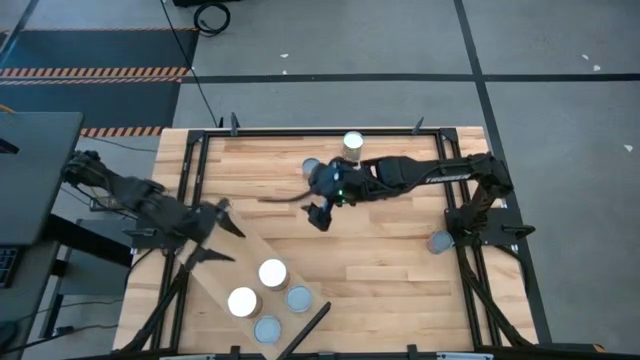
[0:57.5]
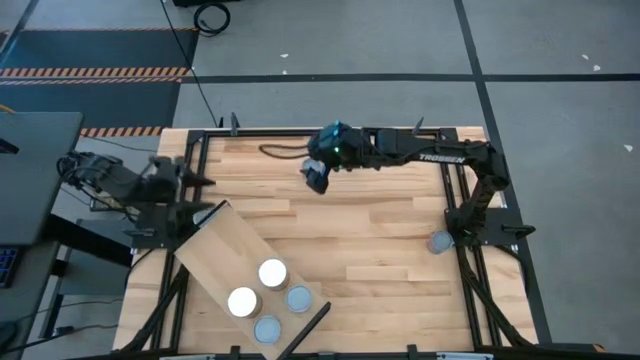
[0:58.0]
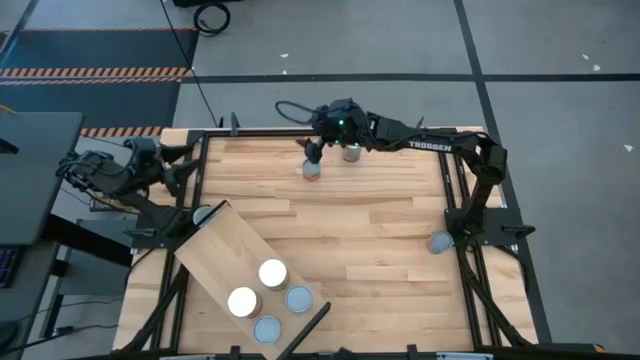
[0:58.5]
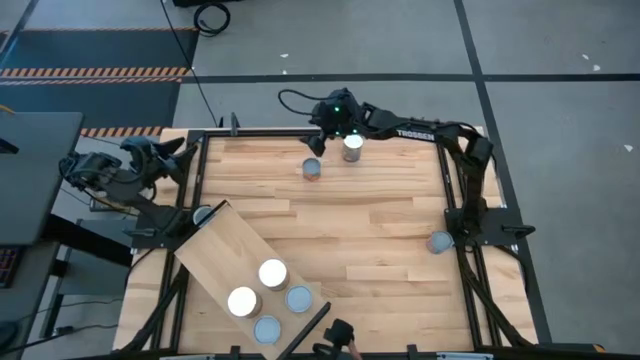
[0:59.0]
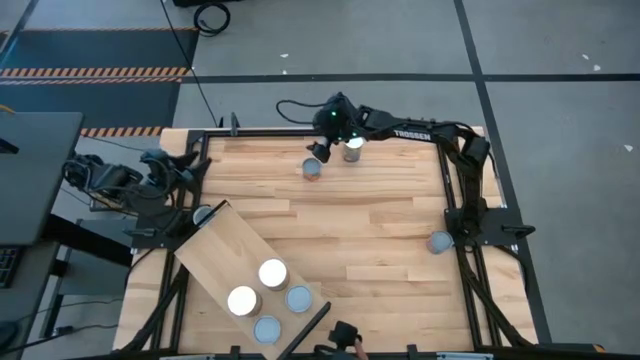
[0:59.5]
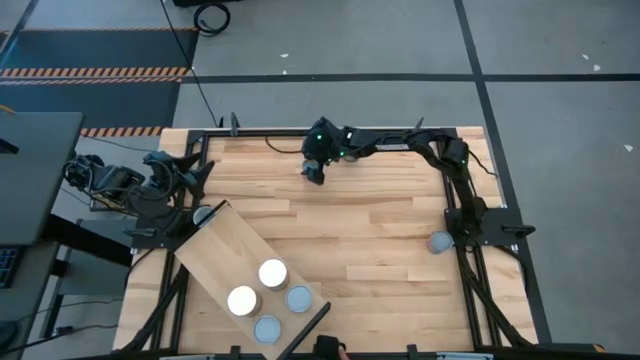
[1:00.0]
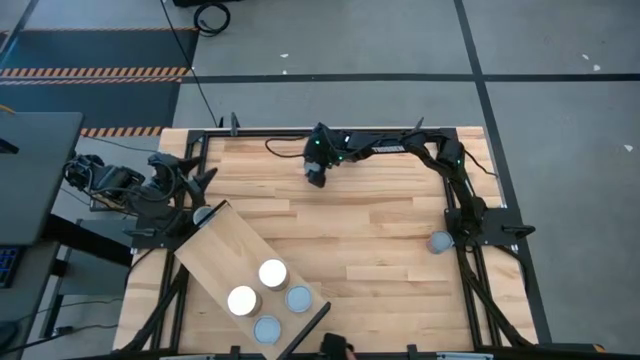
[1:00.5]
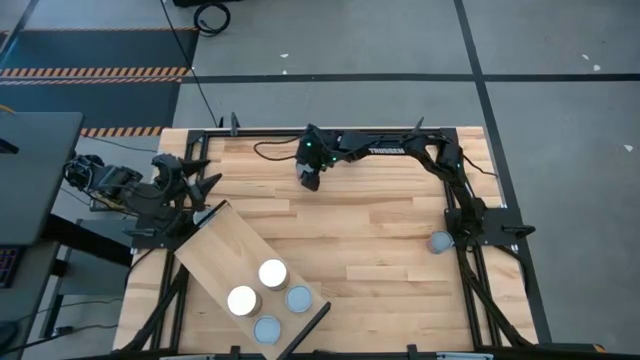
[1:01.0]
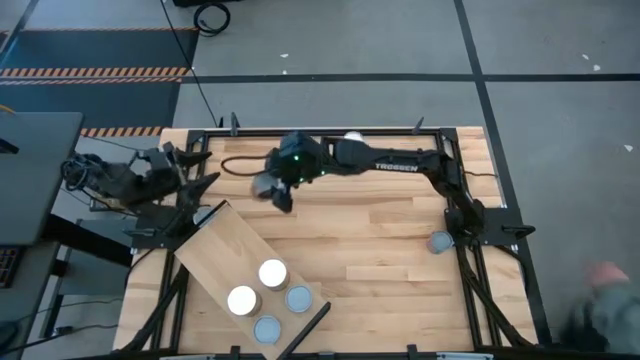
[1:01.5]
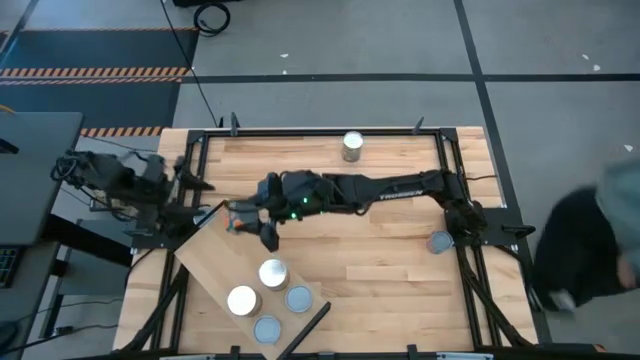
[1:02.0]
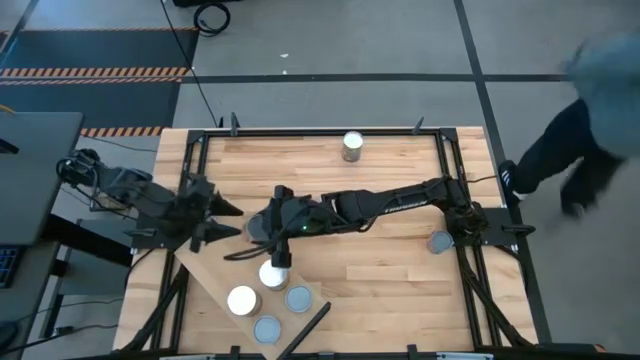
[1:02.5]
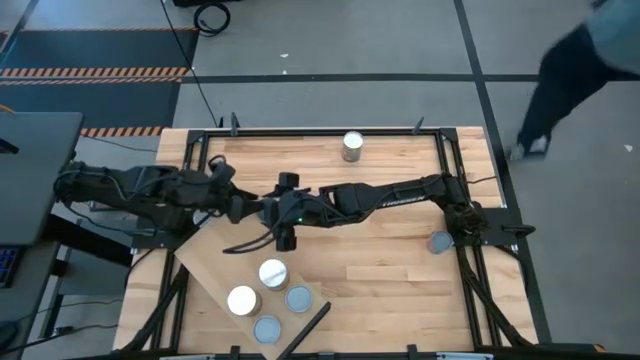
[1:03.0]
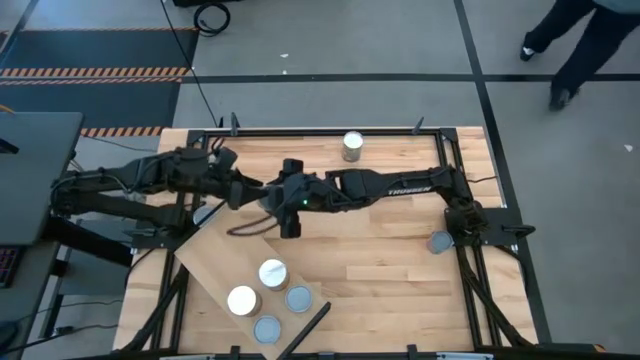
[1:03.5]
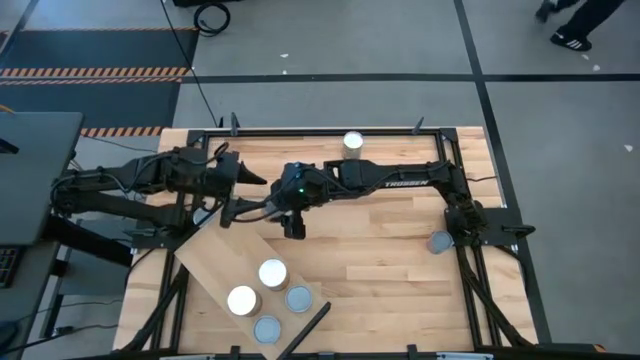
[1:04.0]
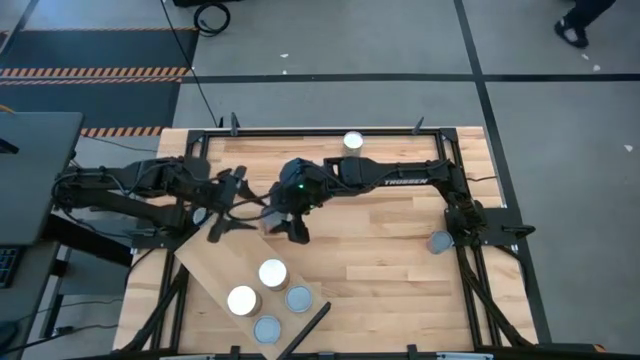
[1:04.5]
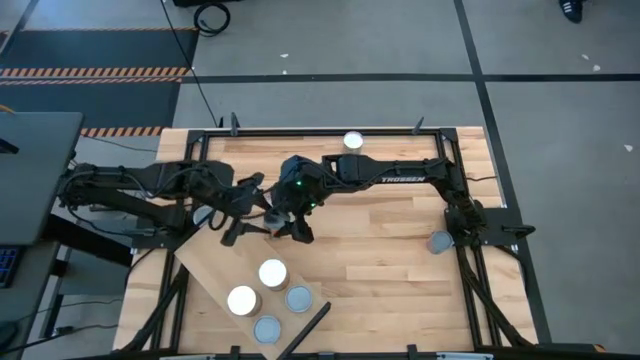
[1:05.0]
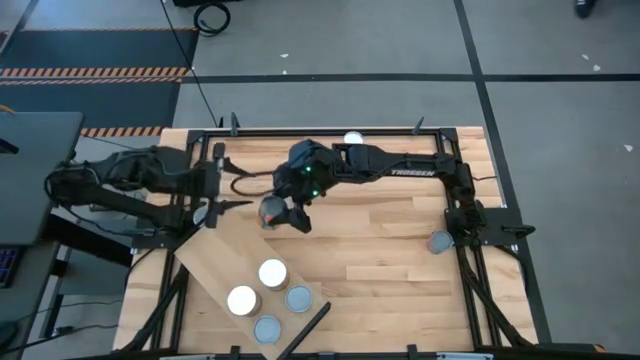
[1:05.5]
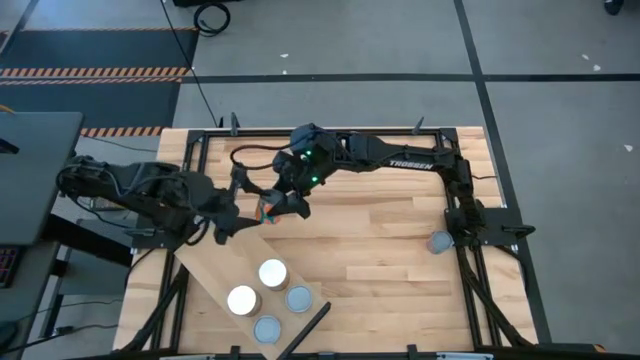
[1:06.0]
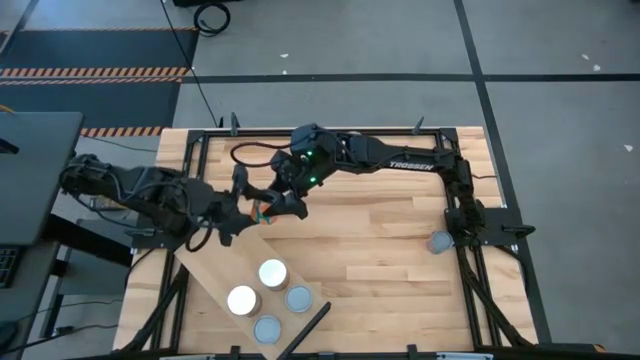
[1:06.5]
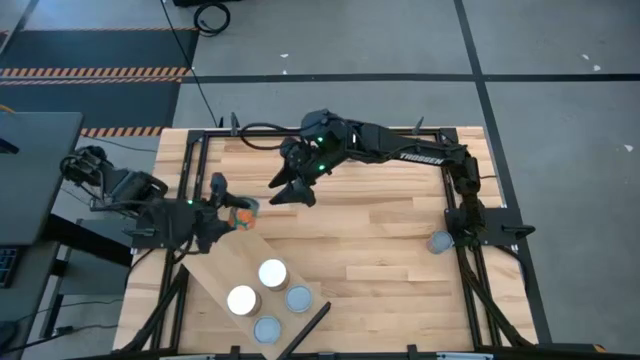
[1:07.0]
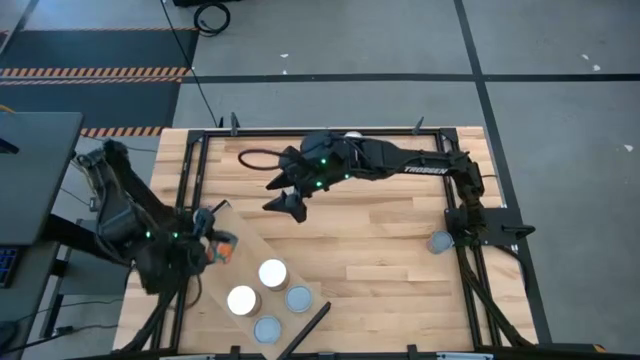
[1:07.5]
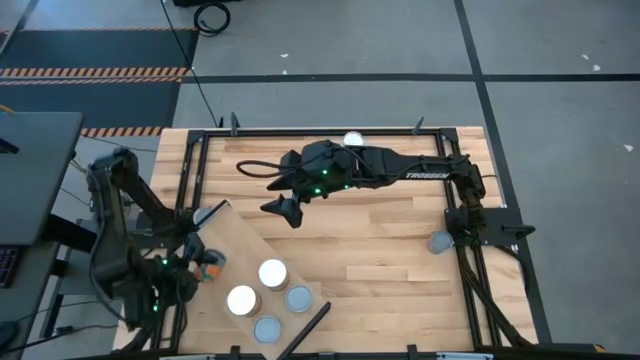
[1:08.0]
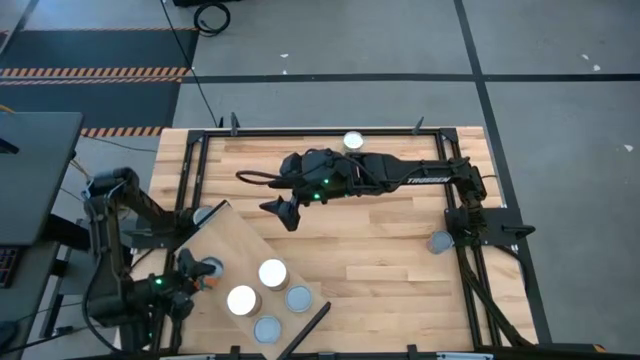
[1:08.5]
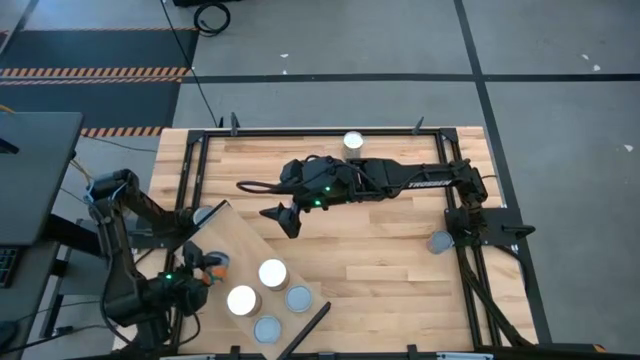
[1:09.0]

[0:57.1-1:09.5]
Task: Pick and place cans onto a shelf
Put the canned oranges on the shelf

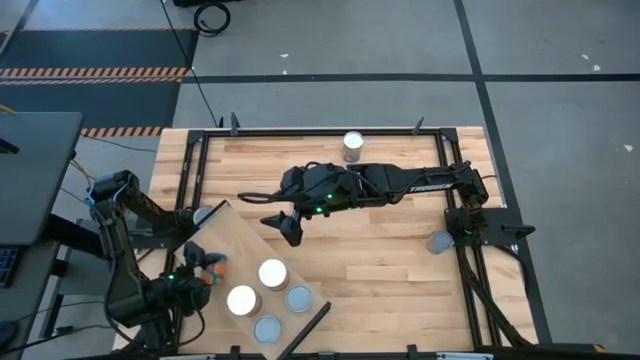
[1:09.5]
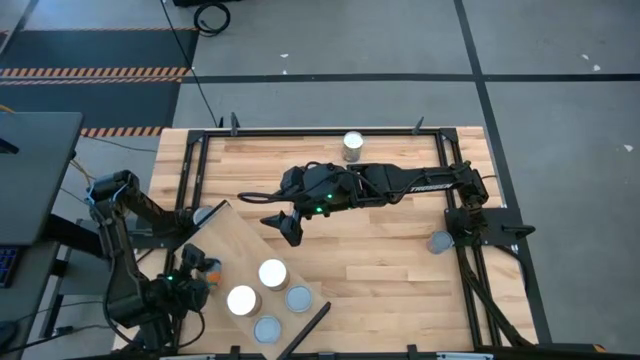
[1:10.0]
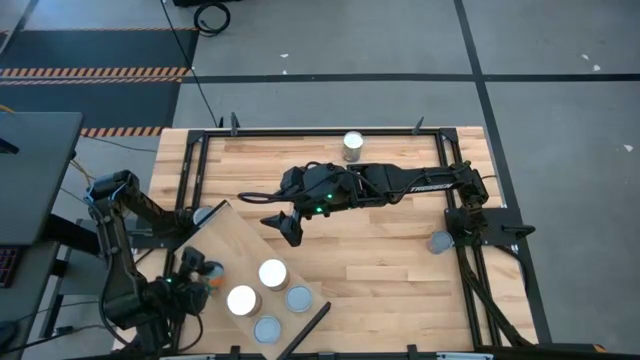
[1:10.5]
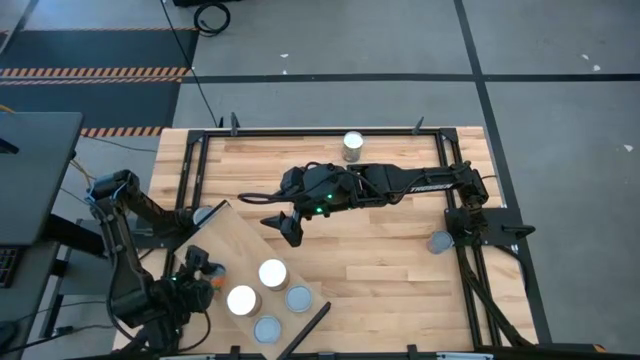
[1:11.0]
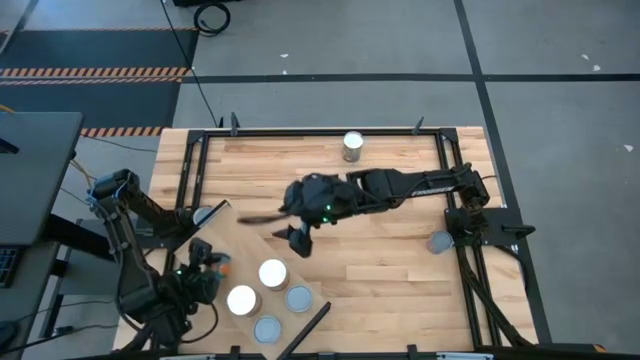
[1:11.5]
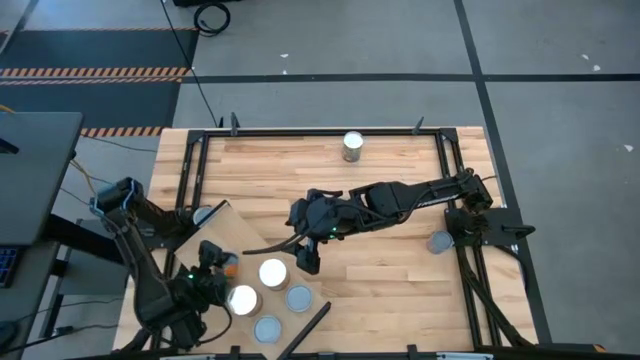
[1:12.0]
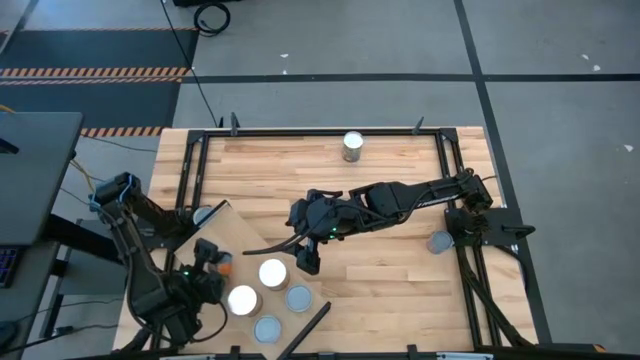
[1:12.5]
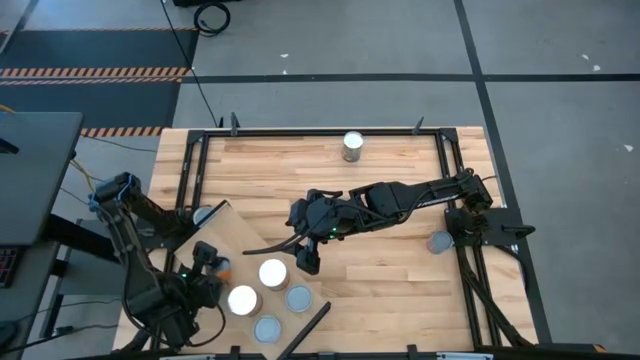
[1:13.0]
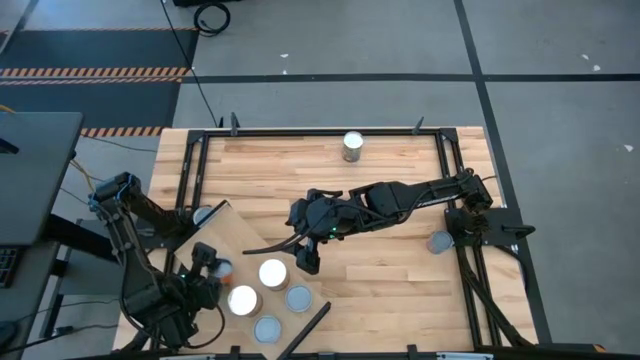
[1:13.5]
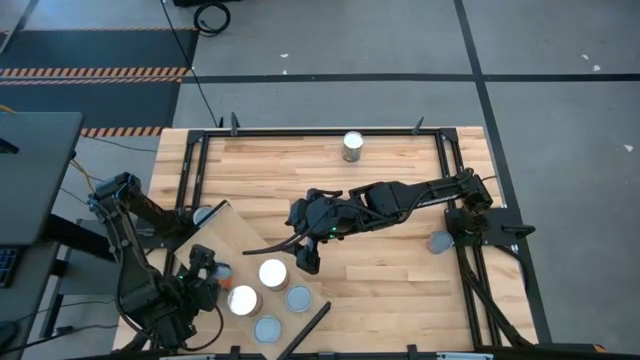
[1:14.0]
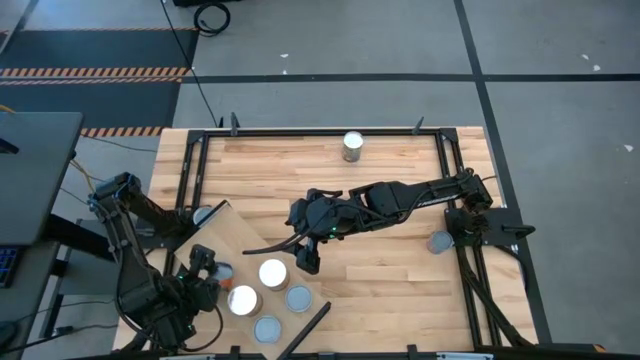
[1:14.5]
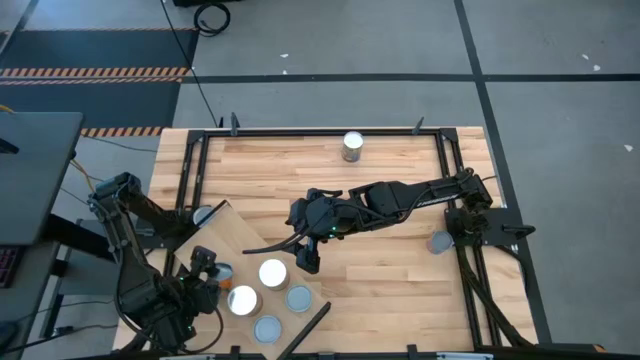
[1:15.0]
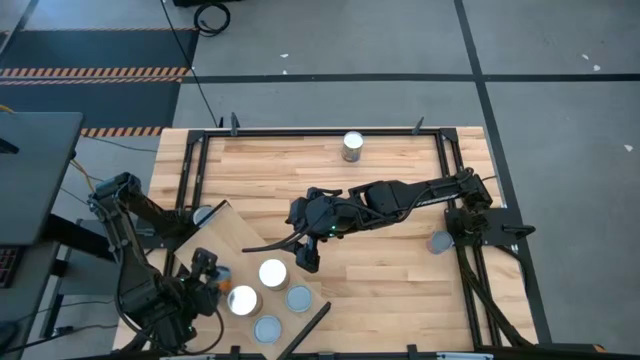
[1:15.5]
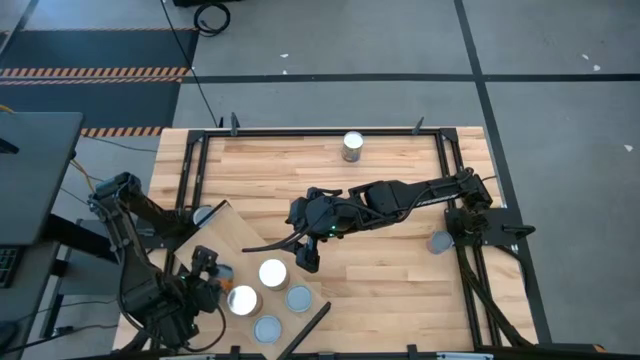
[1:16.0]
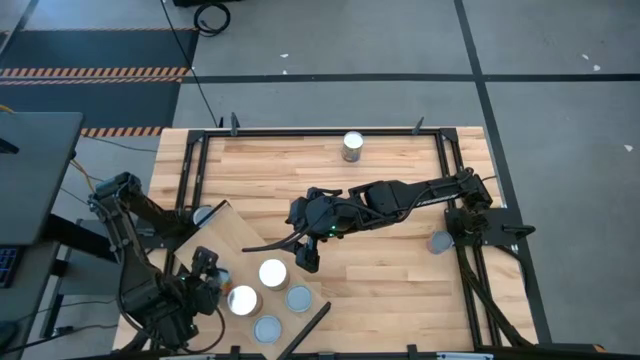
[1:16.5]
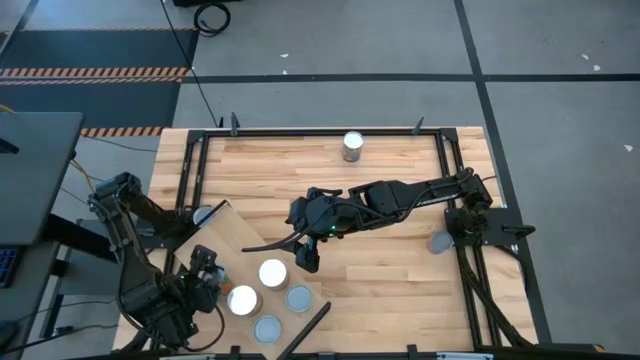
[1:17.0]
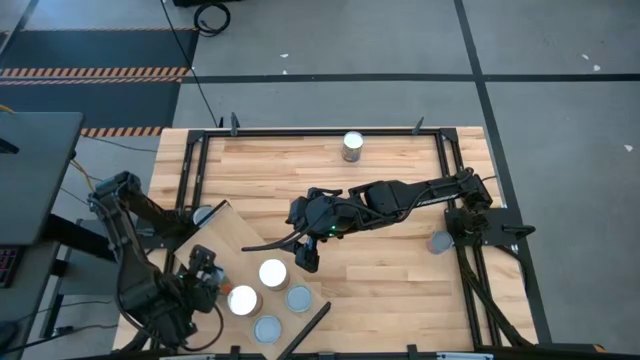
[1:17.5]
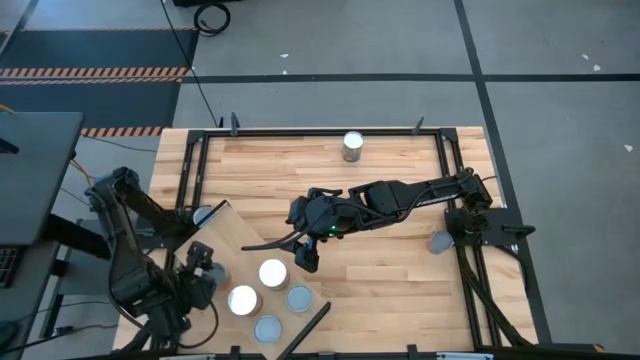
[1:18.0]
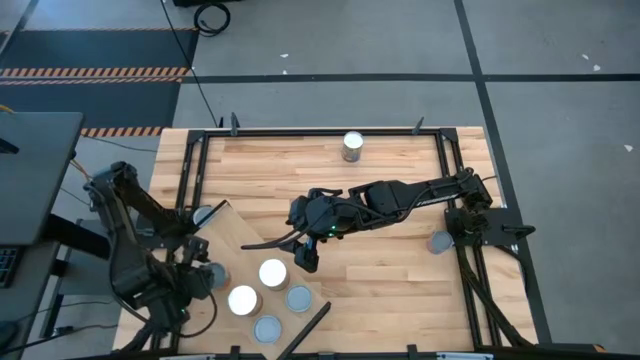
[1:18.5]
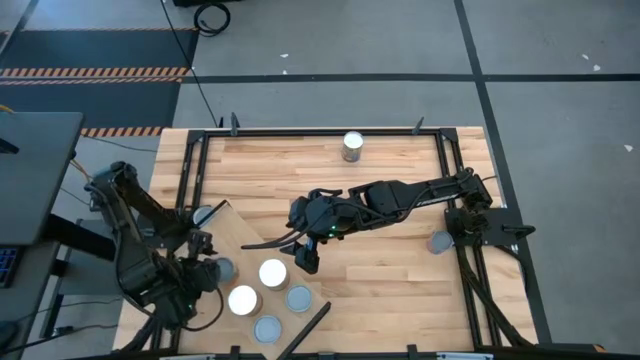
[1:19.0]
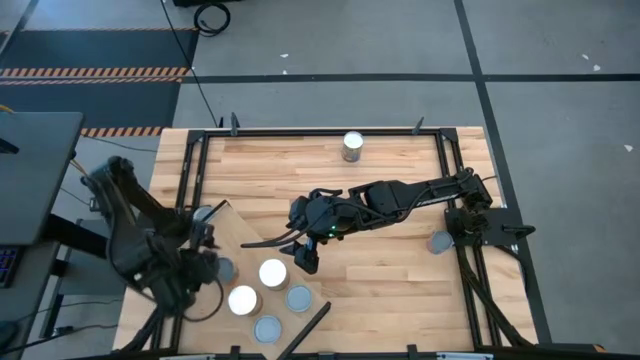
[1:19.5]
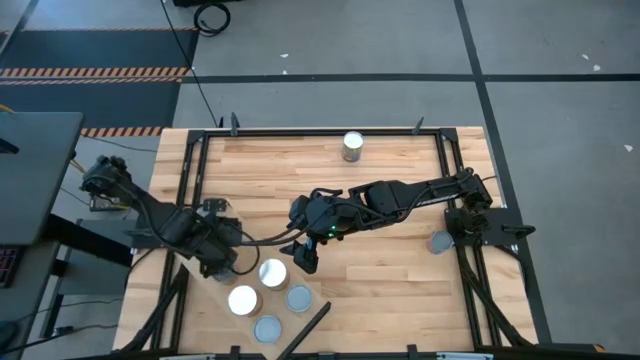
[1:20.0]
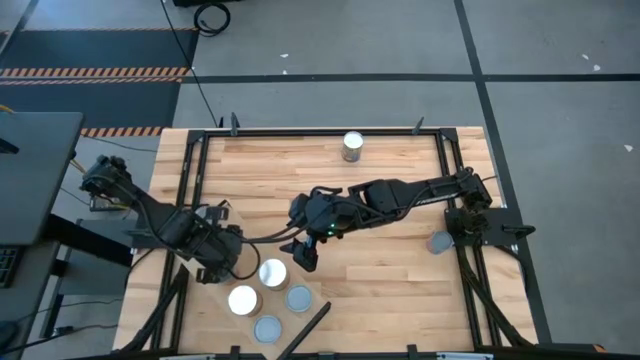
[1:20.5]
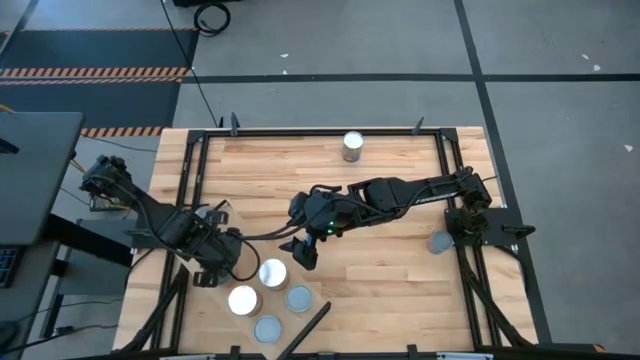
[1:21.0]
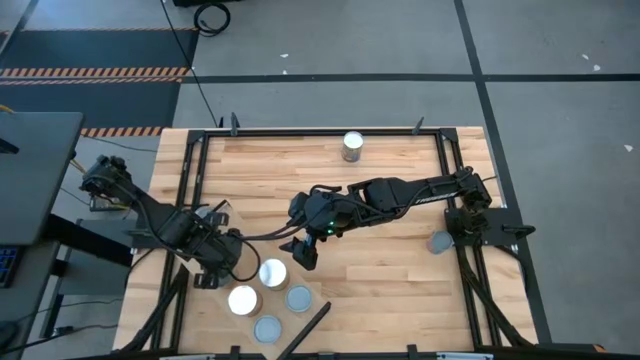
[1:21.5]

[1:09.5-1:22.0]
Put the canned oranges on the shelf
